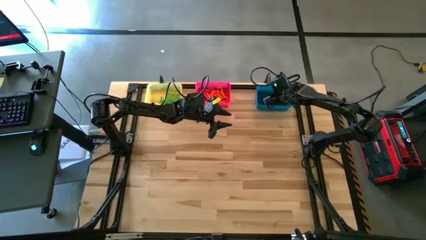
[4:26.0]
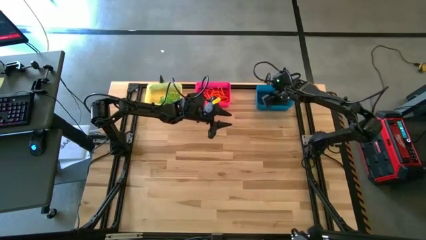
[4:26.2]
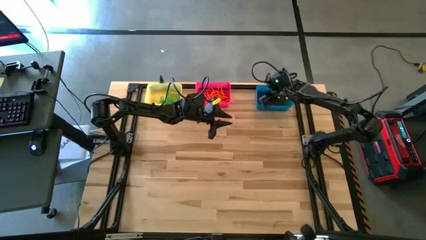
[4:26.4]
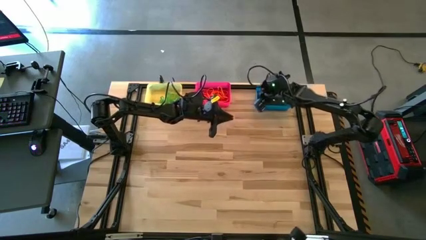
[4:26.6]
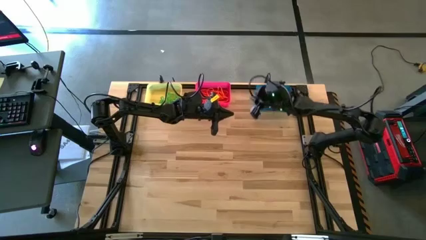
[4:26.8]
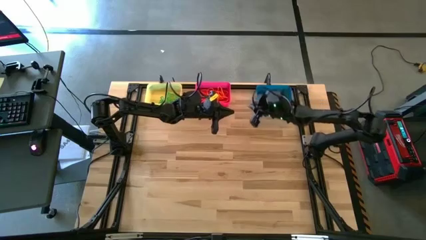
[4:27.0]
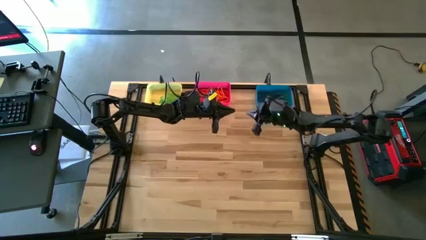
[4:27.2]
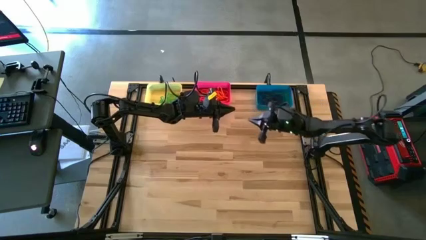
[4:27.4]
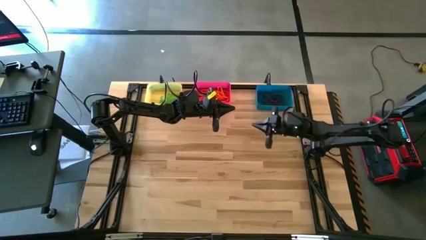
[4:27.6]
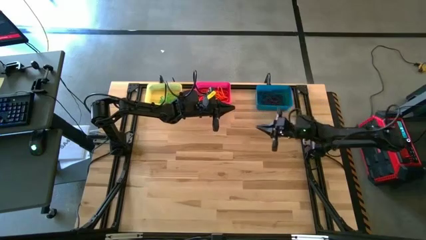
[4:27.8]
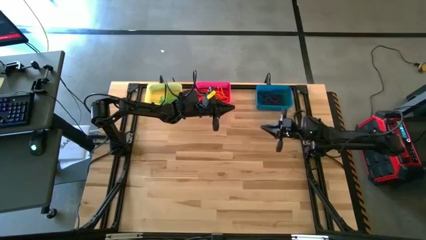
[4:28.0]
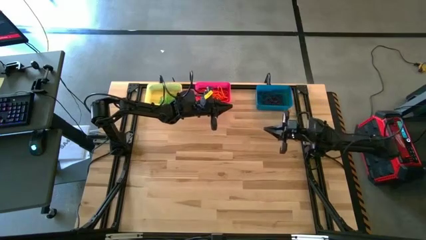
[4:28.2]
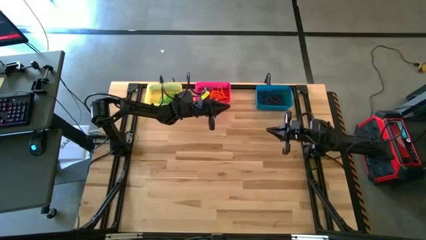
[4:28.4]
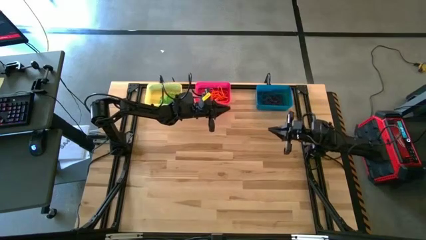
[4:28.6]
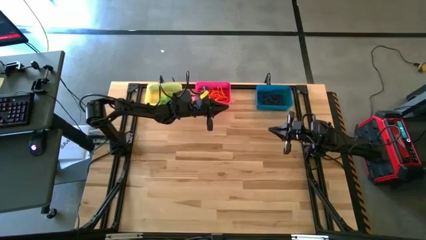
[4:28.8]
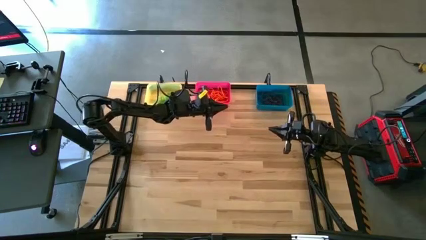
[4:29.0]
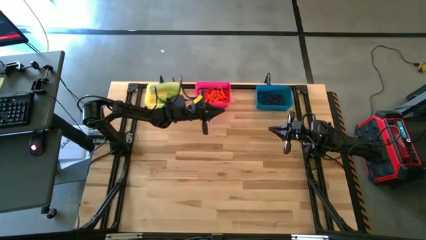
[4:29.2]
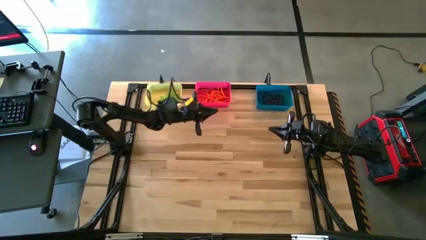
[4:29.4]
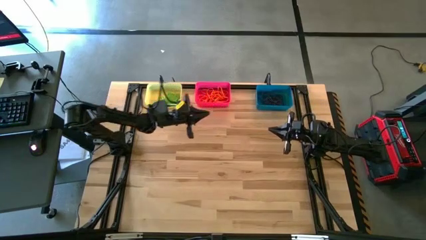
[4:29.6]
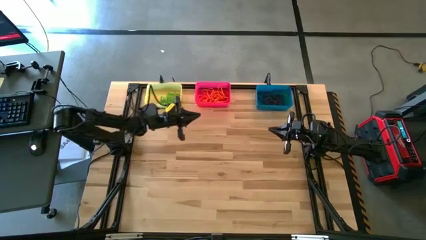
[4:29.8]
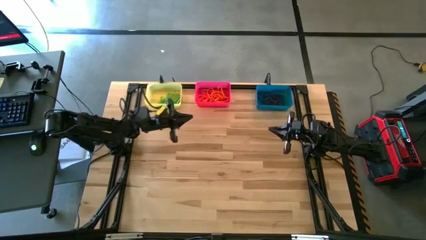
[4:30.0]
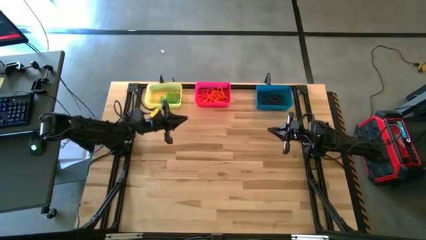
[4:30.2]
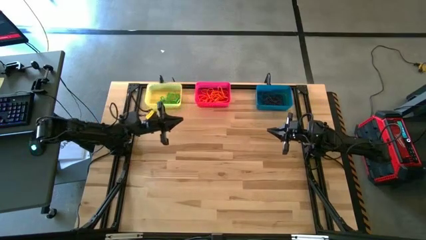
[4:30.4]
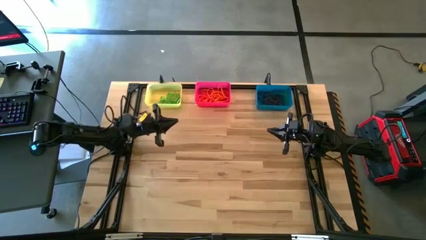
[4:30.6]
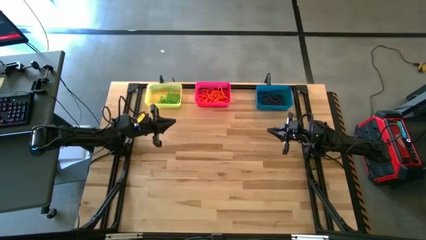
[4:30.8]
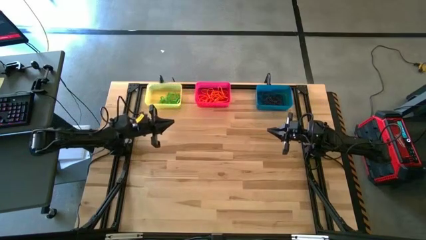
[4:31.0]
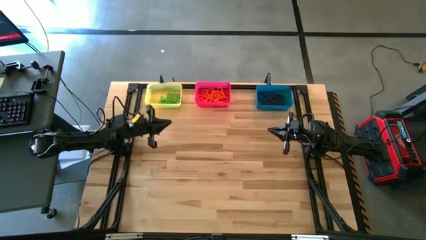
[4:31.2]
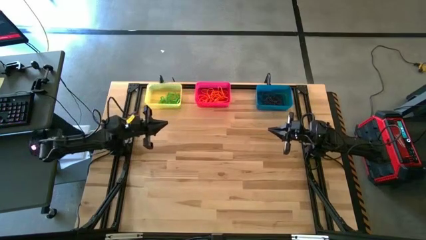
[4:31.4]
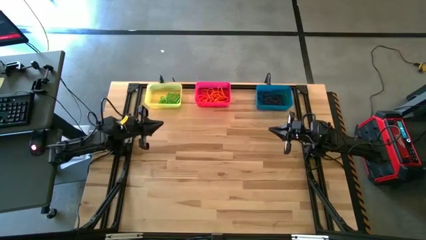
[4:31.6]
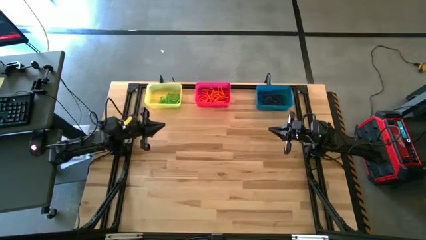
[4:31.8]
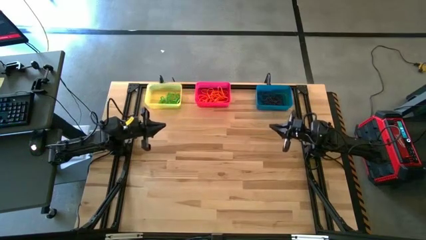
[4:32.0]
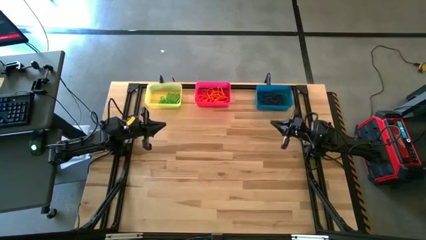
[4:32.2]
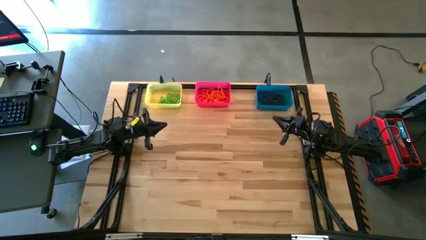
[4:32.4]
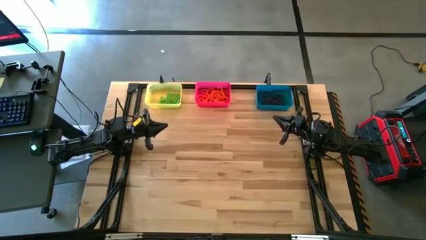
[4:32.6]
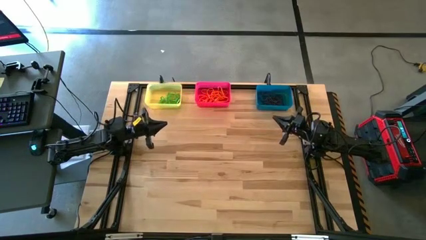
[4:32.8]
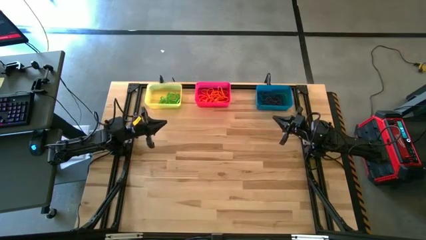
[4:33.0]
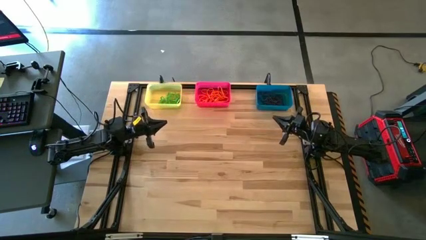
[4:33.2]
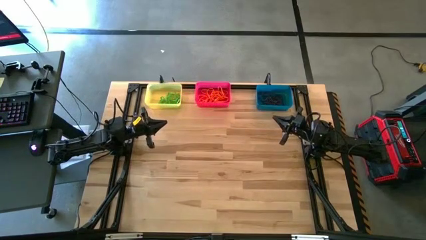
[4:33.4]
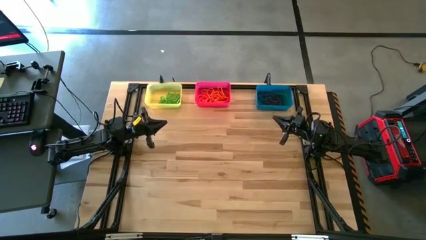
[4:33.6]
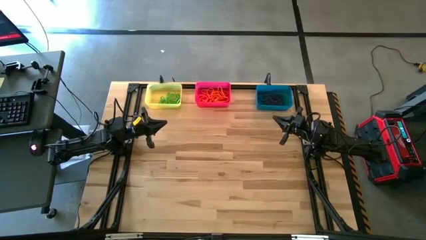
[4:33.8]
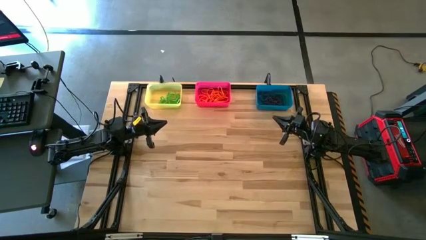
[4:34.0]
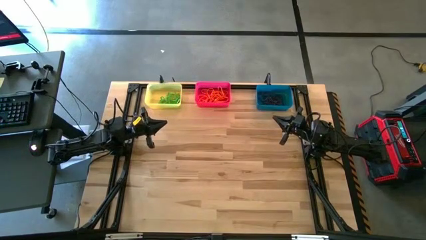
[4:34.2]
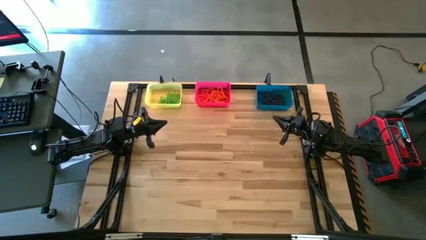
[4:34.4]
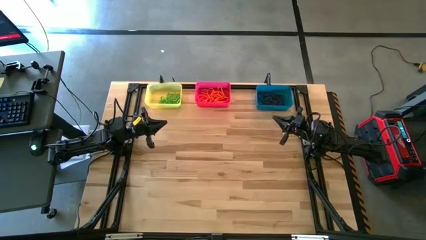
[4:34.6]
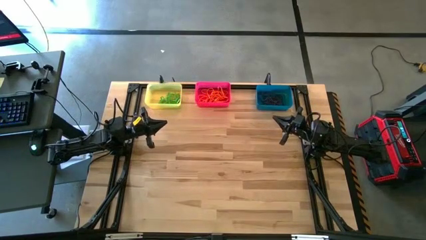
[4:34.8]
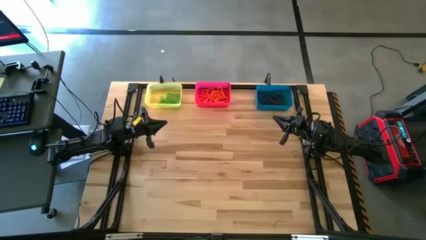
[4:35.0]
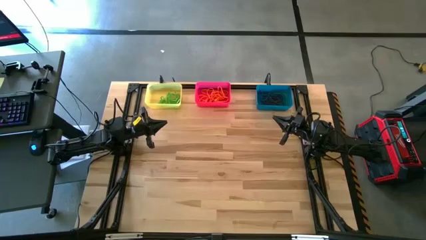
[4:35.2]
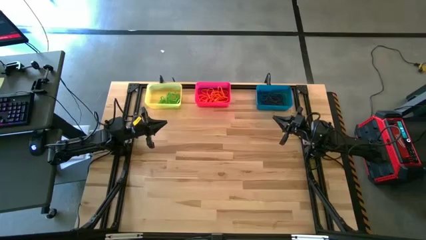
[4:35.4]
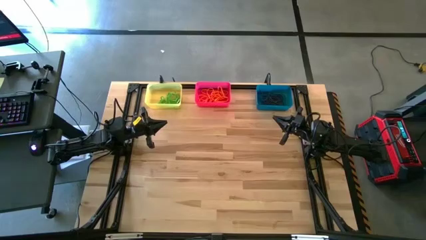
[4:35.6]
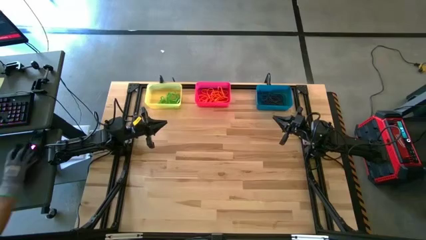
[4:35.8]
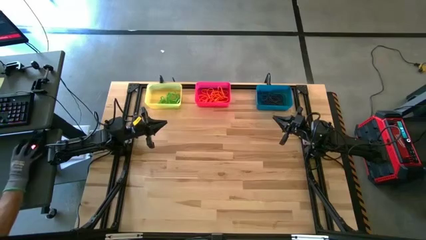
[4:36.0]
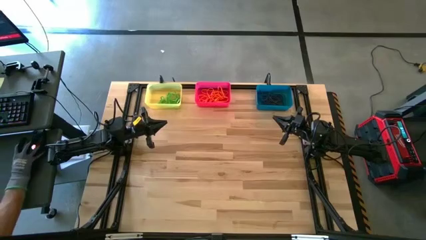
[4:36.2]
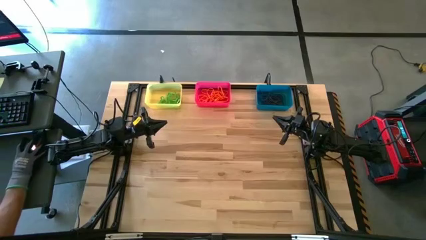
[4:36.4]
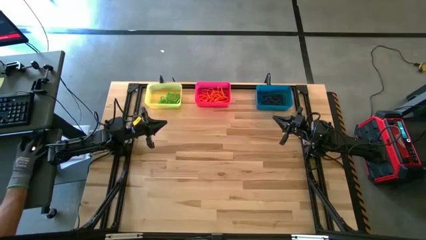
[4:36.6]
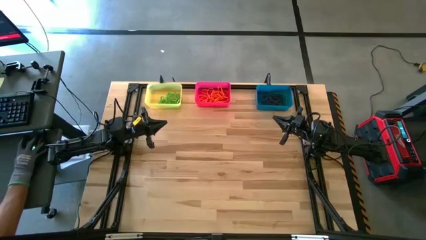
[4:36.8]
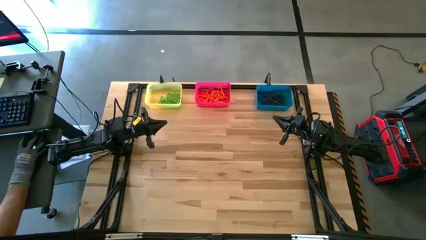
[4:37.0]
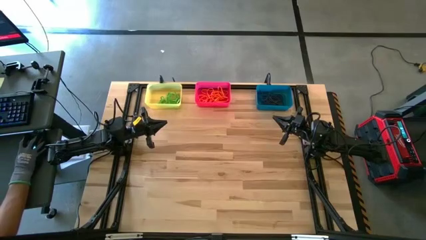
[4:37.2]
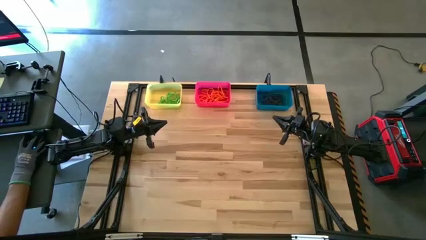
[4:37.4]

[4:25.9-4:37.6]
Task: Sort rubber bands into baskets
Return to Home Position
